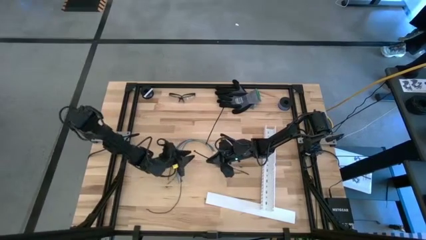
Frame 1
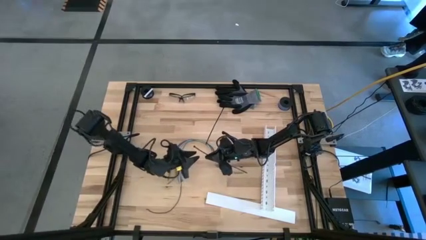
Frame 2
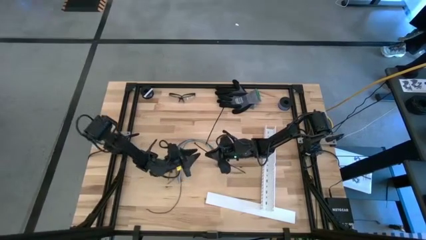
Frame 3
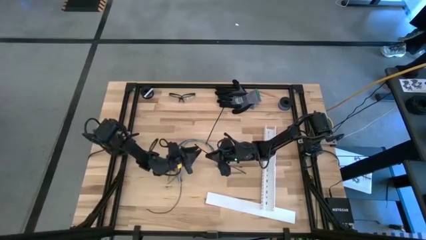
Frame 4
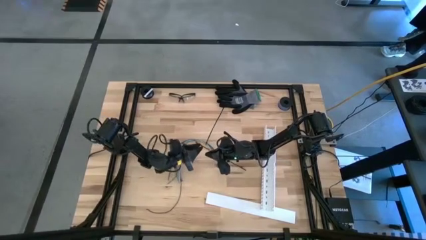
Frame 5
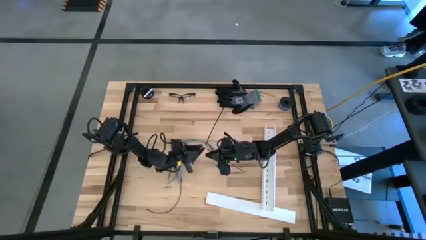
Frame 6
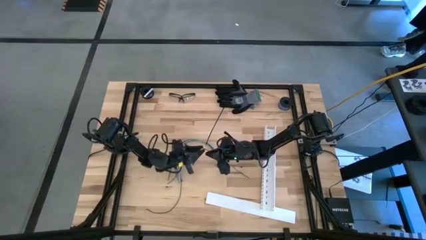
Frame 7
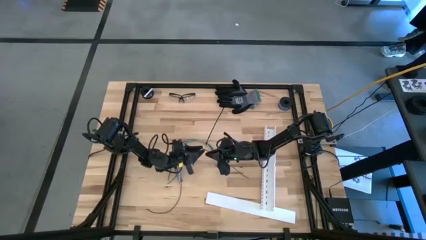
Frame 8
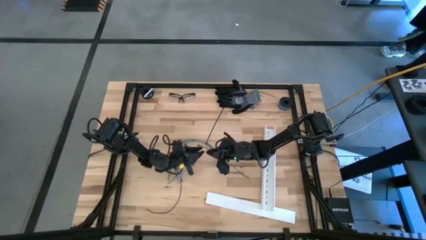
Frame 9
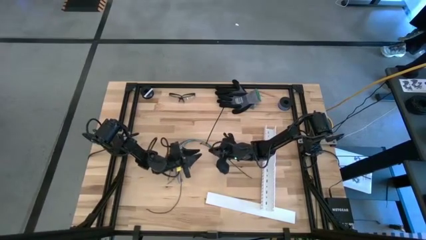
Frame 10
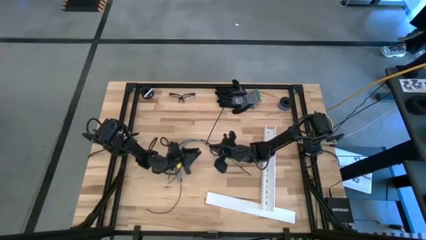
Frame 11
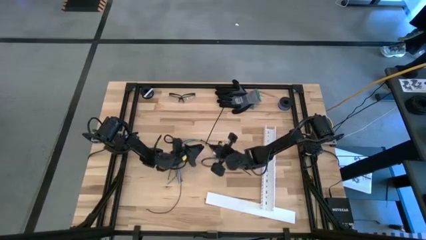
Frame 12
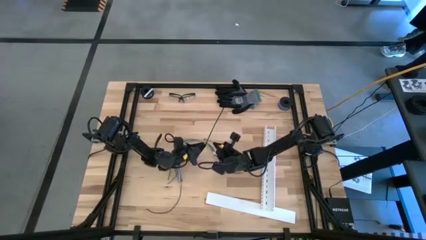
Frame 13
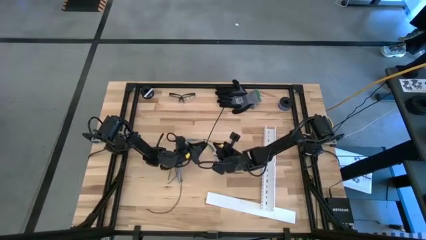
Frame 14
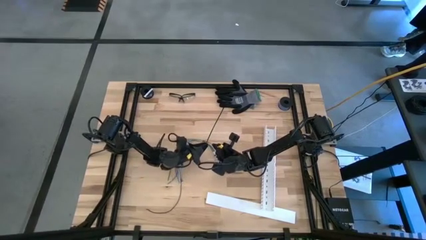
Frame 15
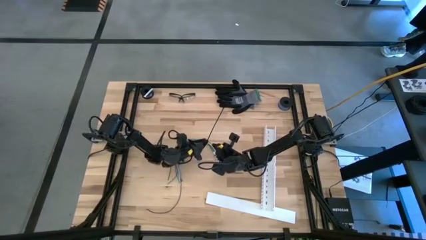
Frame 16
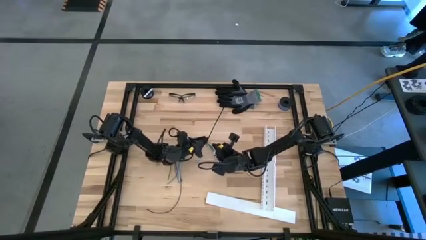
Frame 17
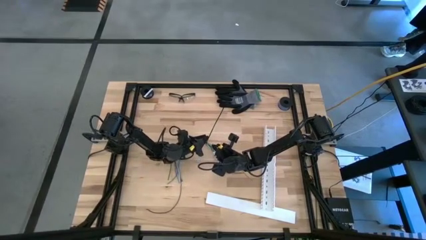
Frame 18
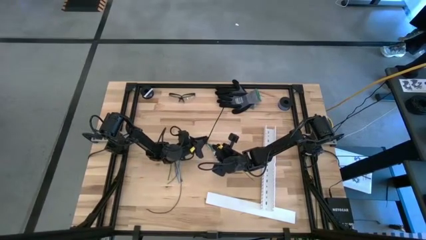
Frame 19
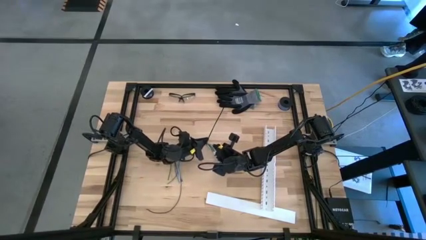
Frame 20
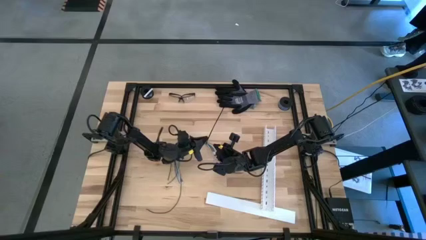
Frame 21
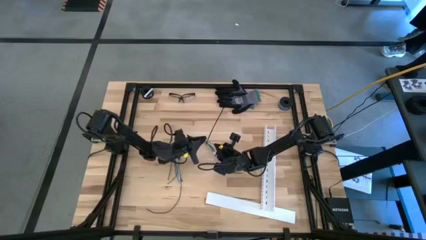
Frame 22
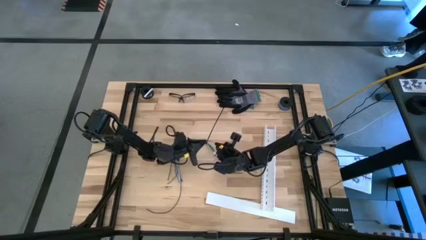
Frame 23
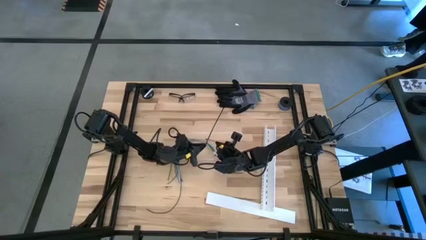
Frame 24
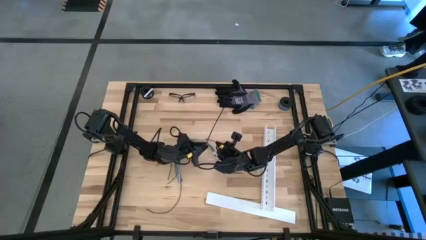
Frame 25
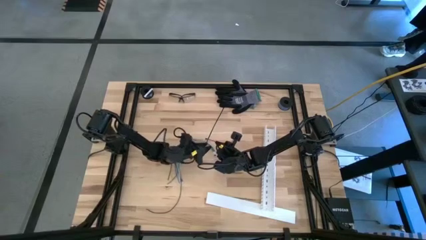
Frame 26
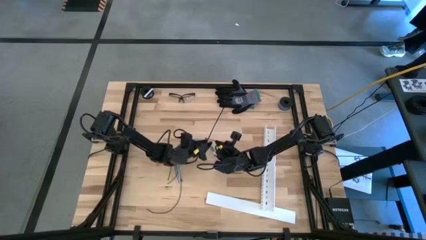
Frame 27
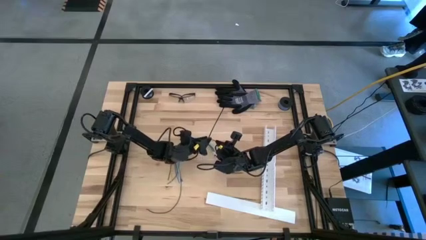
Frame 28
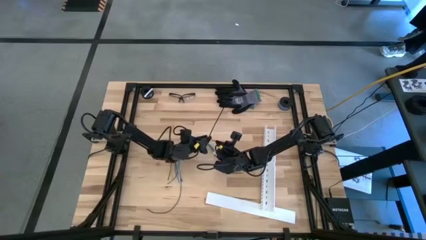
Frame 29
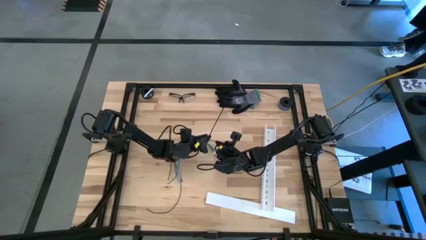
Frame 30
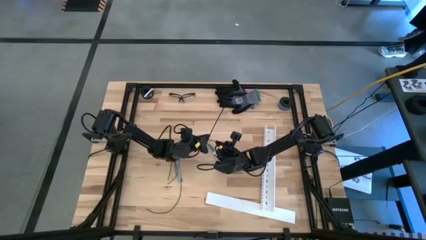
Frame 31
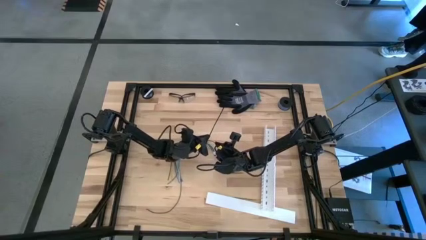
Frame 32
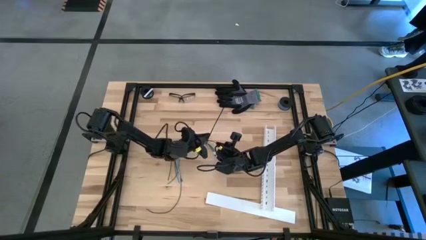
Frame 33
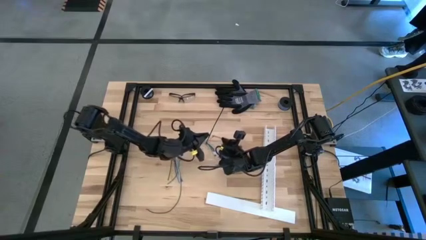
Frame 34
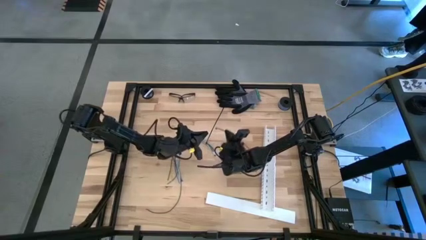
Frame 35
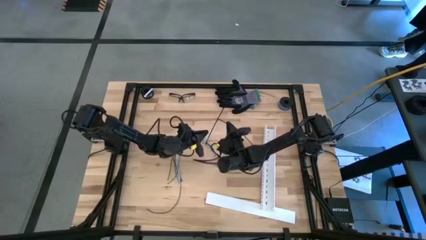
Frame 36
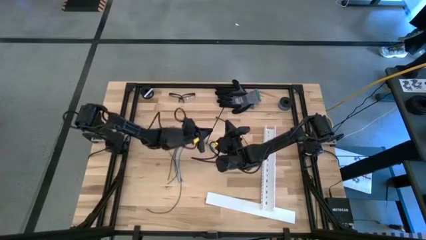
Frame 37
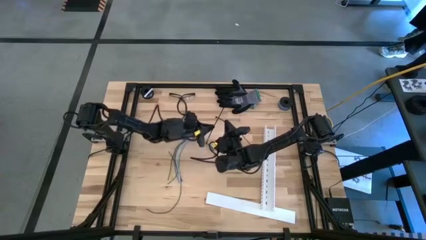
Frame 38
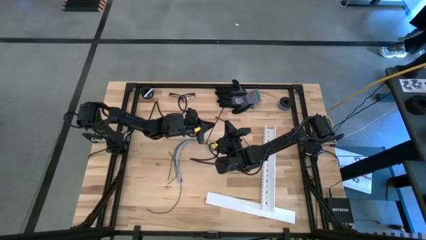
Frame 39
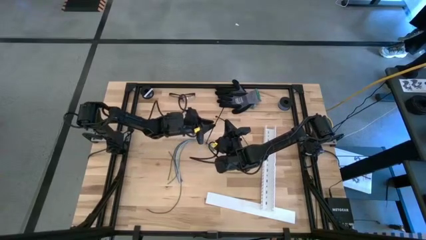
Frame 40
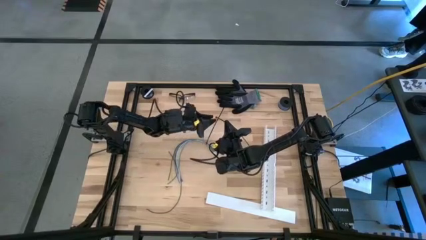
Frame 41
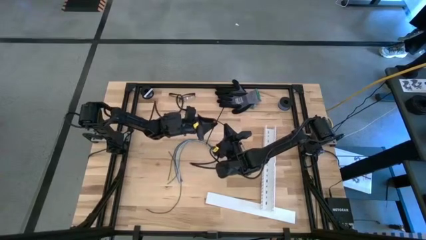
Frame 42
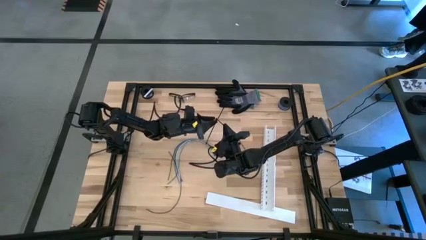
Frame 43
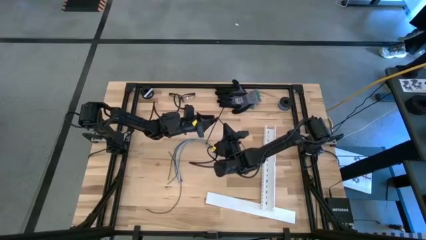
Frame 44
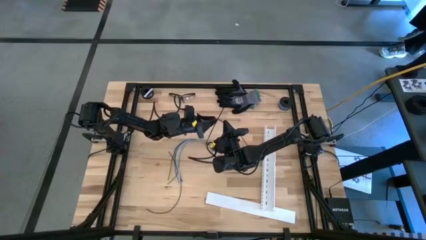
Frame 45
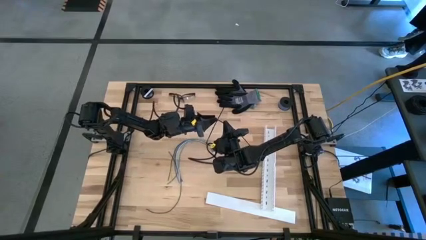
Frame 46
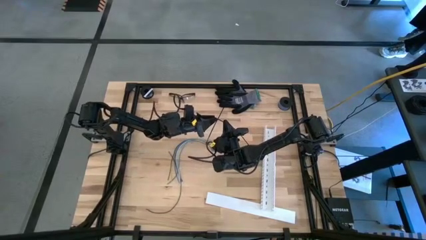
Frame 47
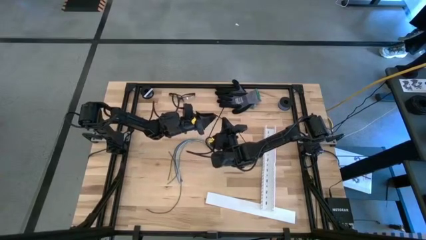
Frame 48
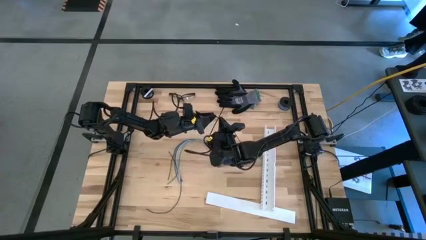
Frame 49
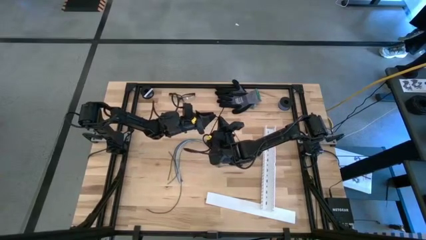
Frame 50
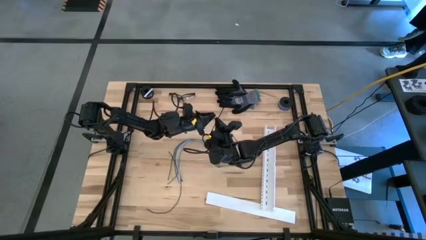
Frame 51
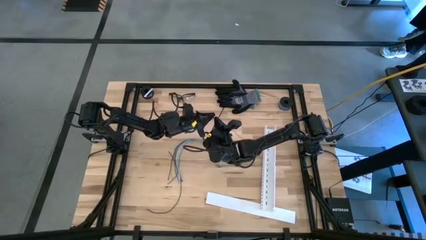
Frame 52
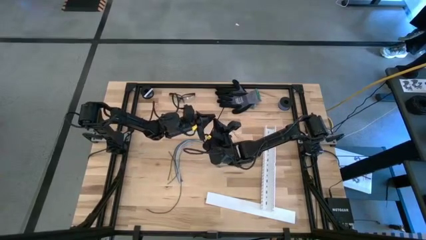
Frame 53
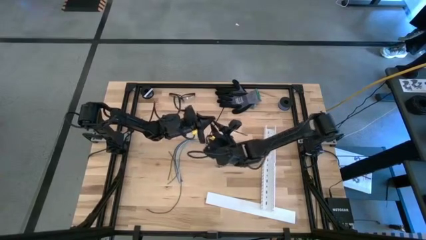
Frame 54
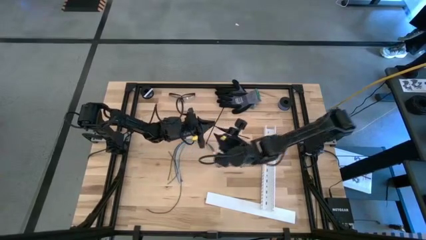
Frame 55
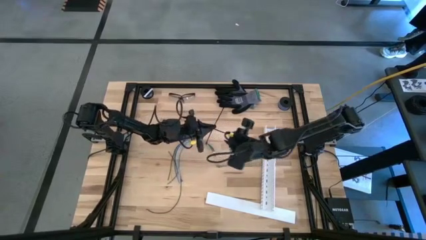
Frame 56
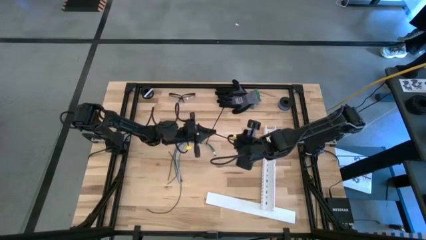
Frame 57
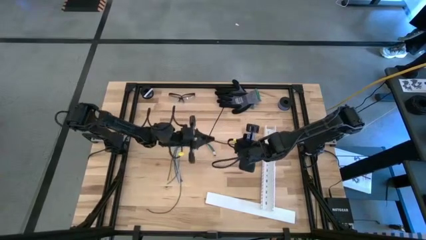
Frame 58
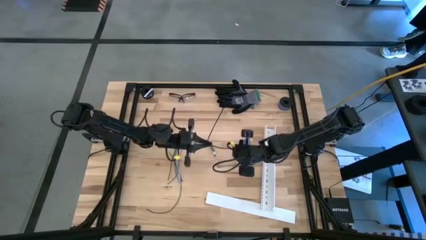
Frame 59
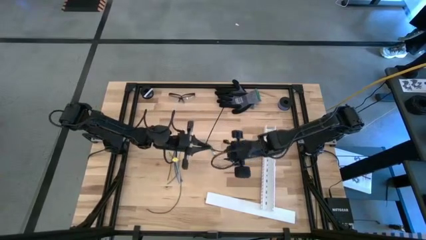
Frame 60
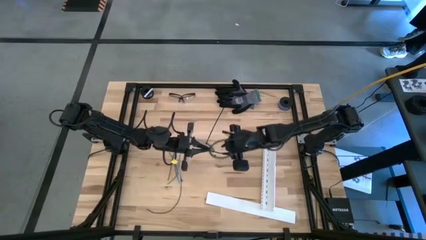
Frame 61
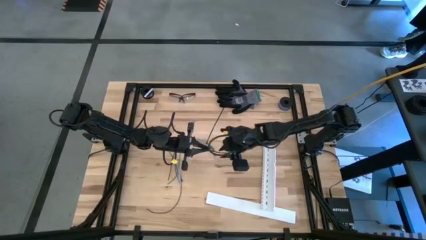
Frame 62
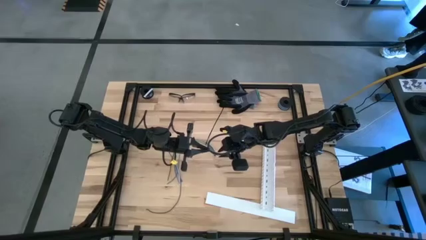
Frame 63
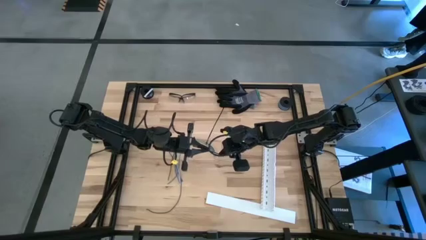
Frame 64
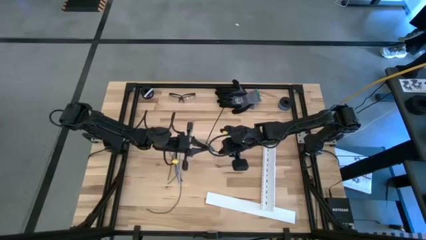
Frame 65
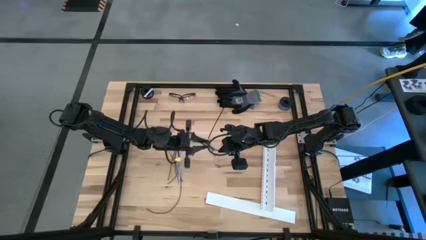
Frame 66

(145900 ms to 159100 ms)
Task: Ziptie cables
Wrap the cable wires with the black zip tie

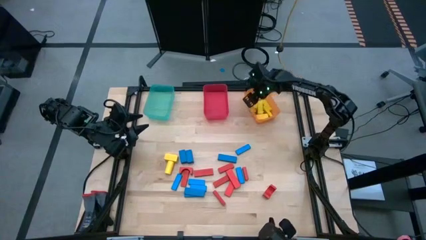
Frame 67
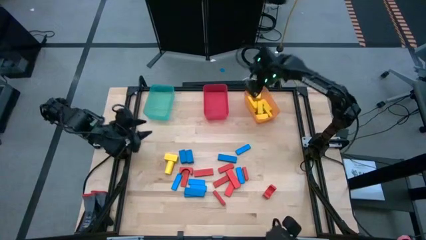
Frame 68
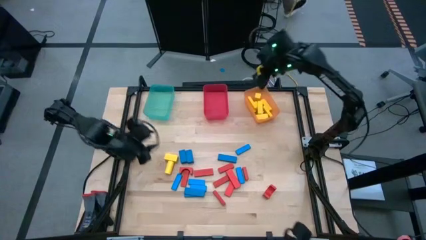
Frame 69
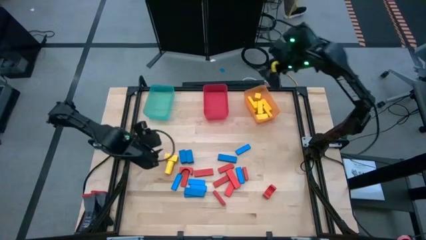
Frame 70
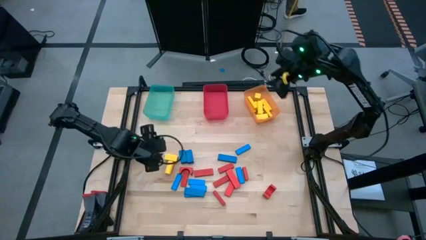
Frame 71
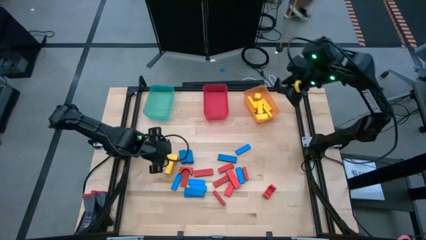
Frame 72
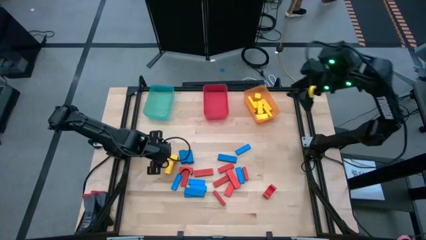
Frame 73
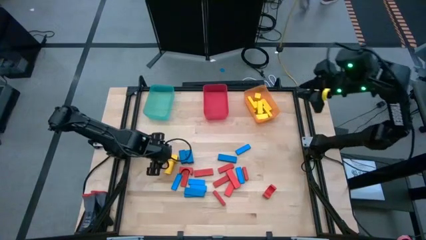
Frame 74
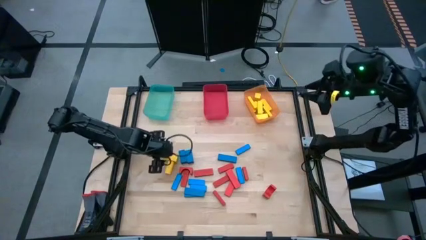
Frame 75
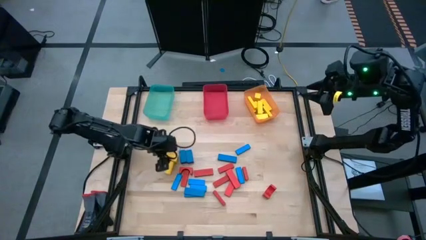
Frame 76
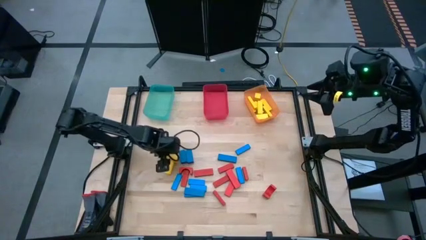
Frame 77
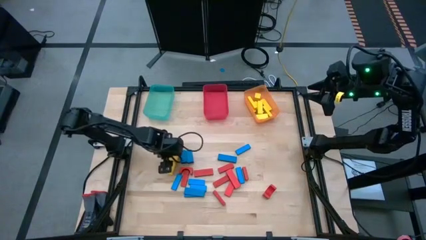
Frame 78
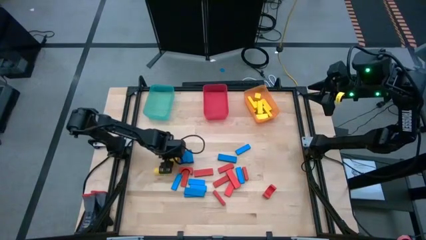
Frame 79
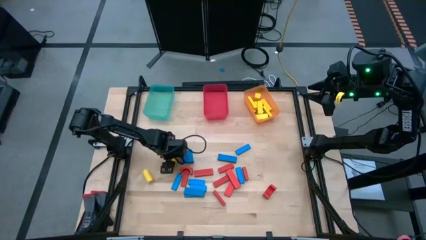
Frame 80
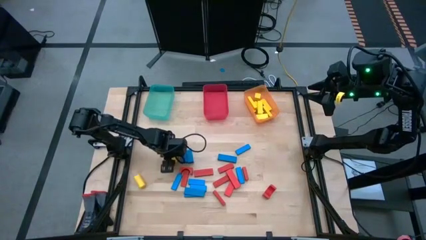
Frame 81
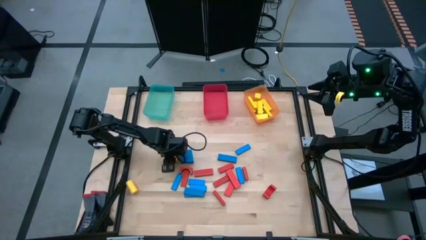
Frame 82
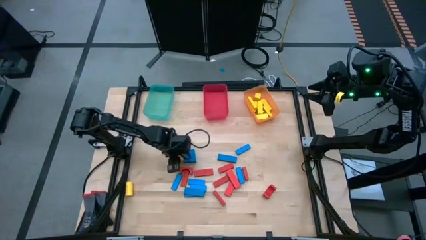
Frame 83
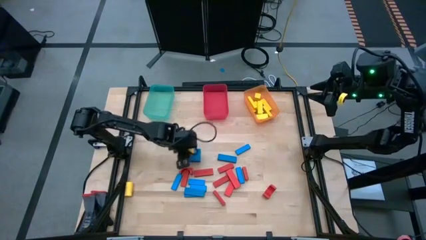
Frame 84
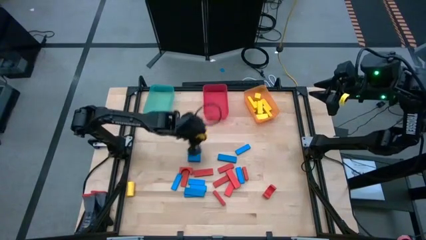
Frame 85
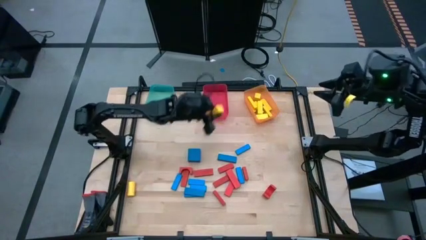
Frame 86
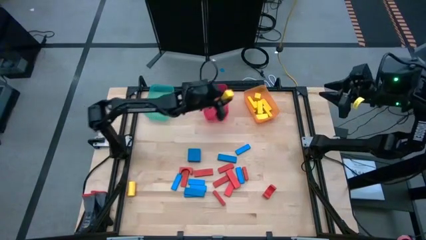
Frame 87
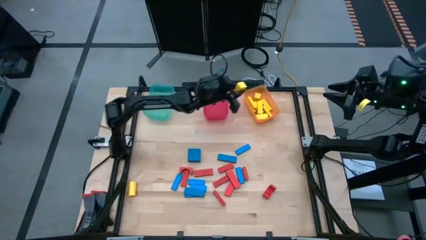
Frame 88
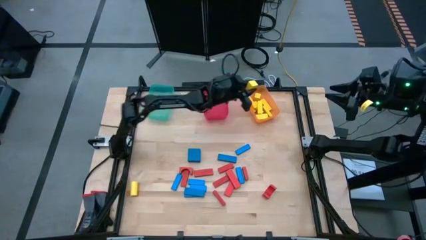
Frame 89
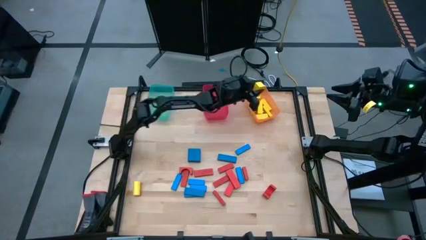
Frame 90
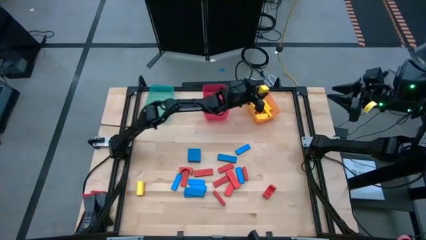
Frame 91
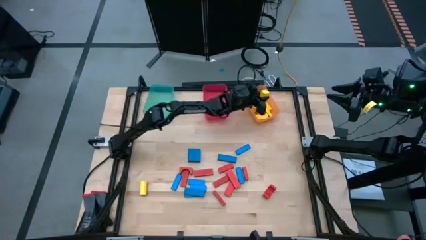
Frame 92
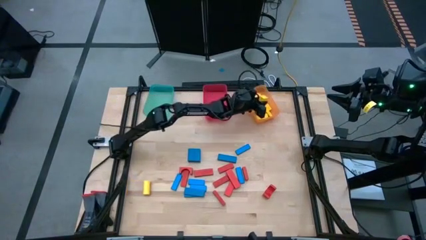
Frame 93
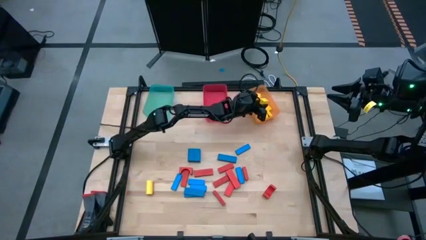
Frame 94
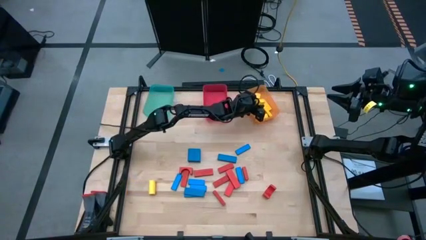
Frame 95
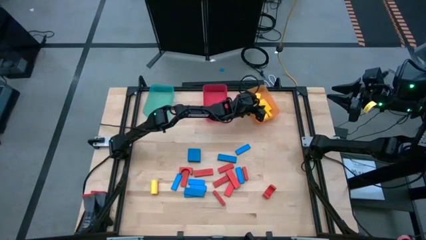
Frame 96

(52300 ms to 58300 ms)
Task: Sort blocks
Put the yellow block into the orange bin
